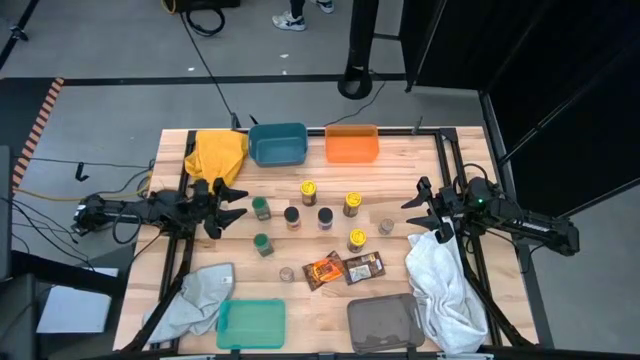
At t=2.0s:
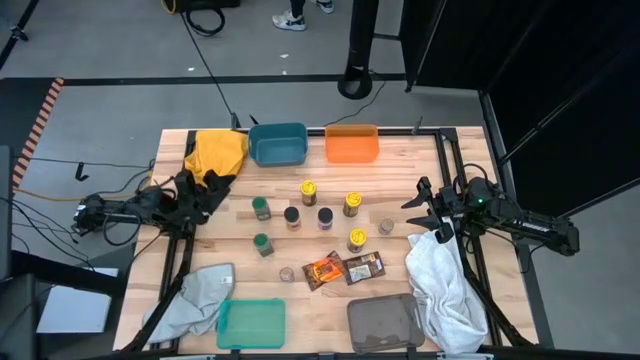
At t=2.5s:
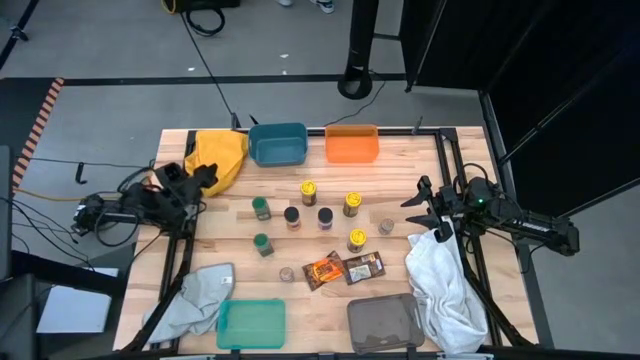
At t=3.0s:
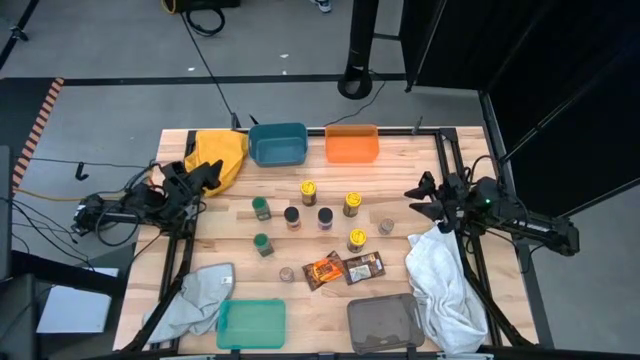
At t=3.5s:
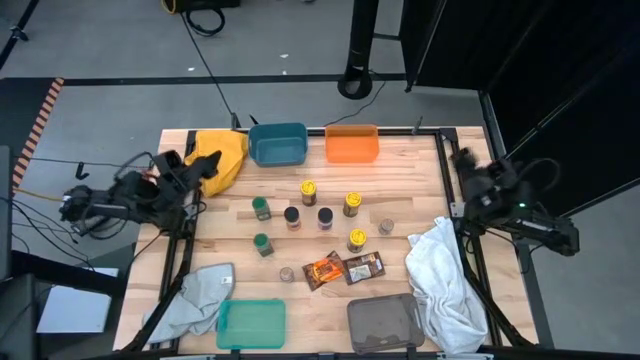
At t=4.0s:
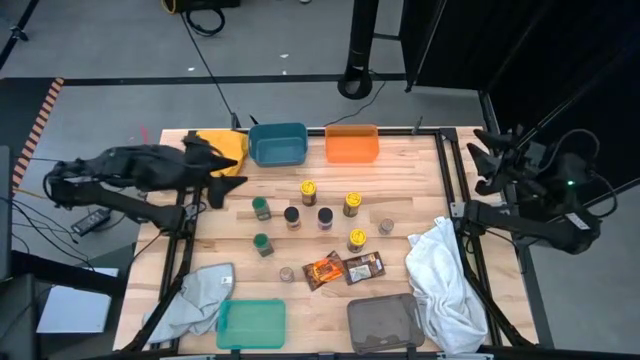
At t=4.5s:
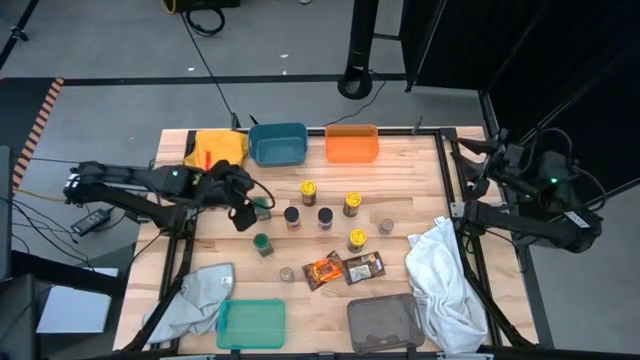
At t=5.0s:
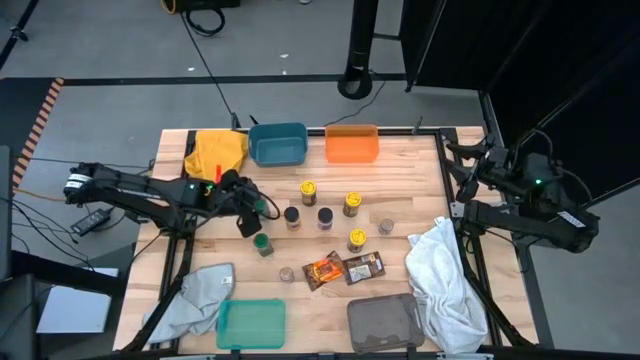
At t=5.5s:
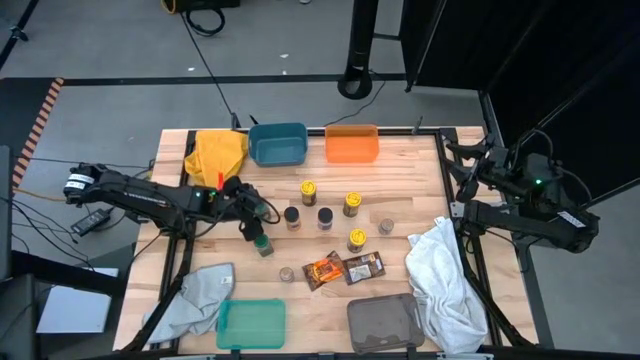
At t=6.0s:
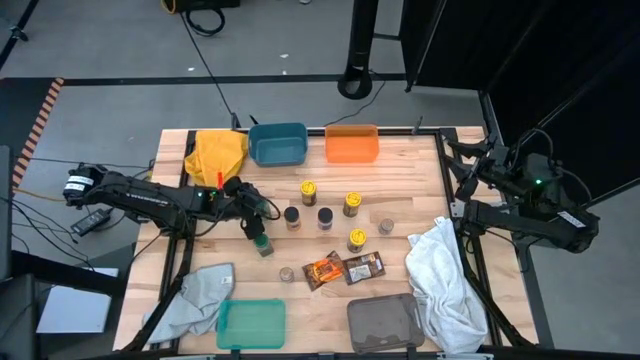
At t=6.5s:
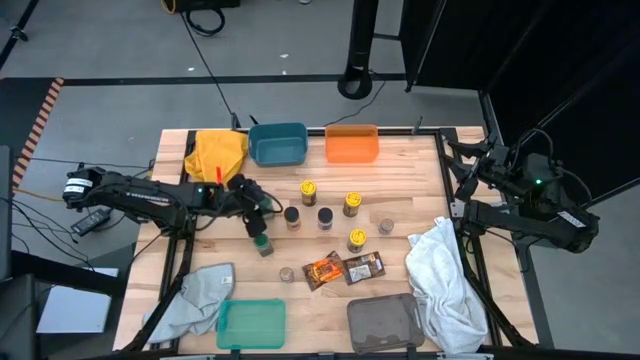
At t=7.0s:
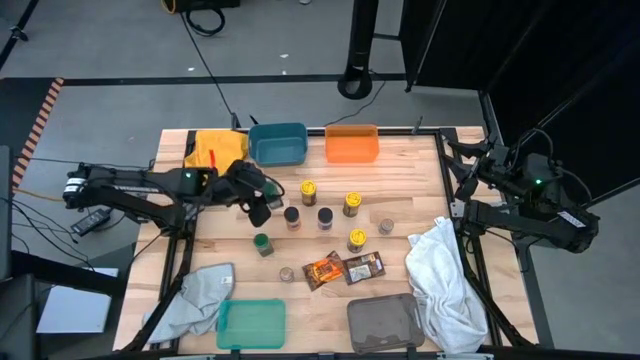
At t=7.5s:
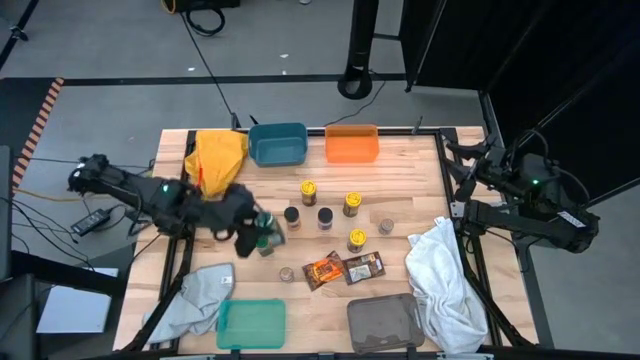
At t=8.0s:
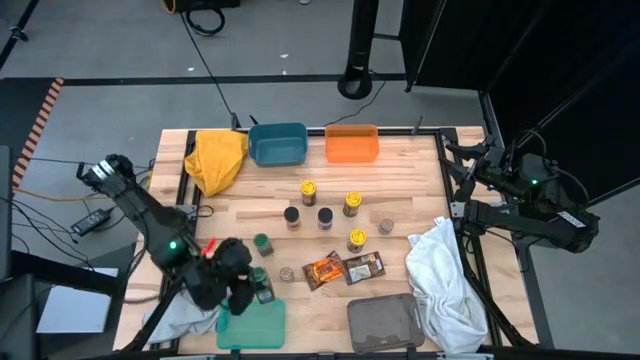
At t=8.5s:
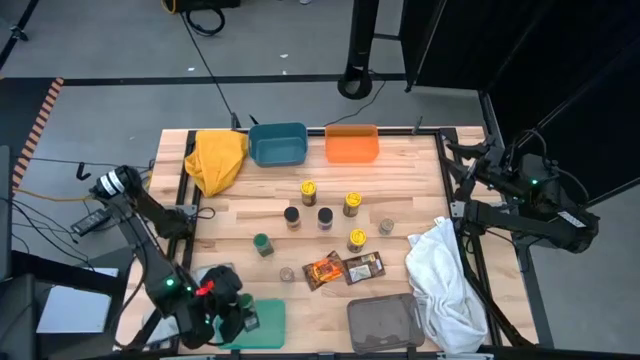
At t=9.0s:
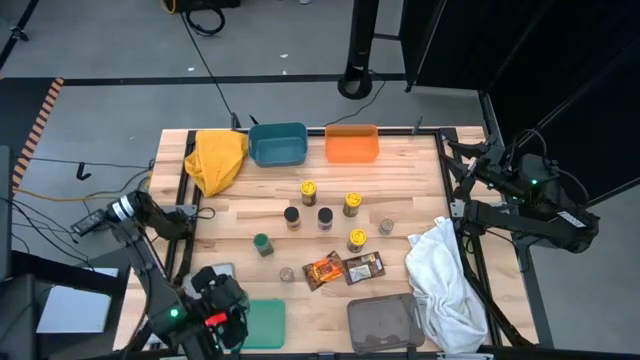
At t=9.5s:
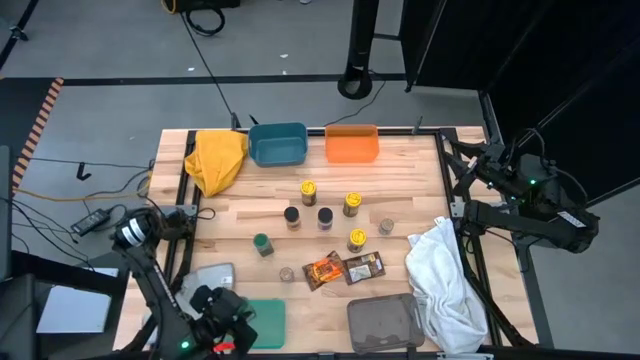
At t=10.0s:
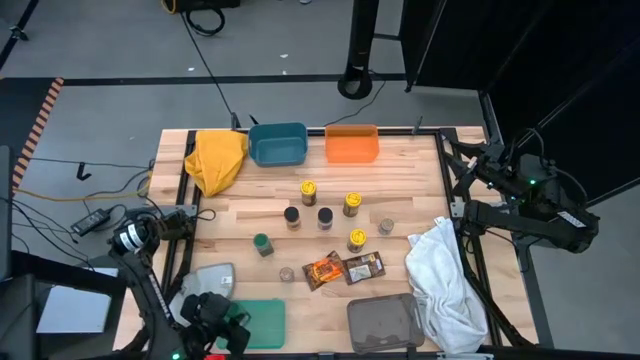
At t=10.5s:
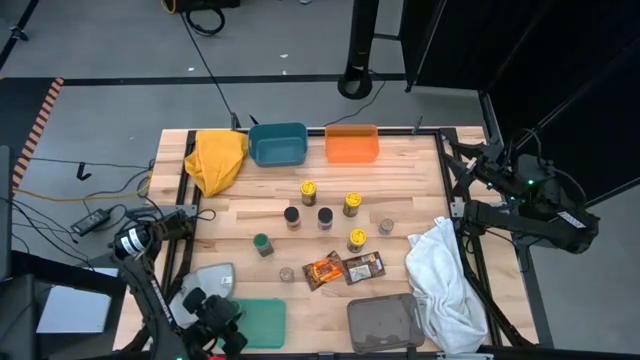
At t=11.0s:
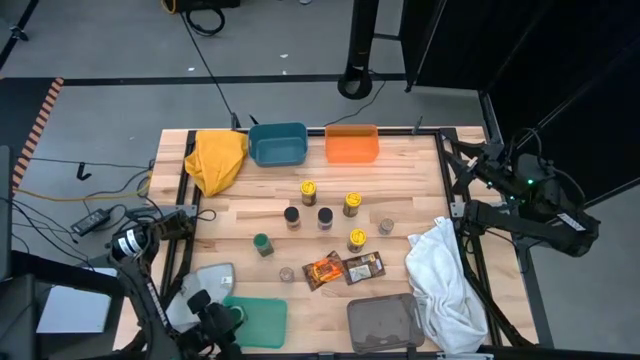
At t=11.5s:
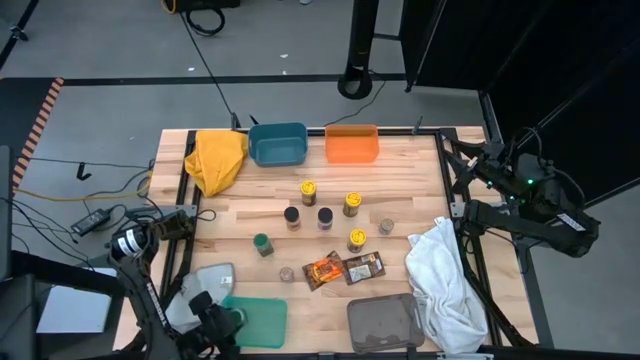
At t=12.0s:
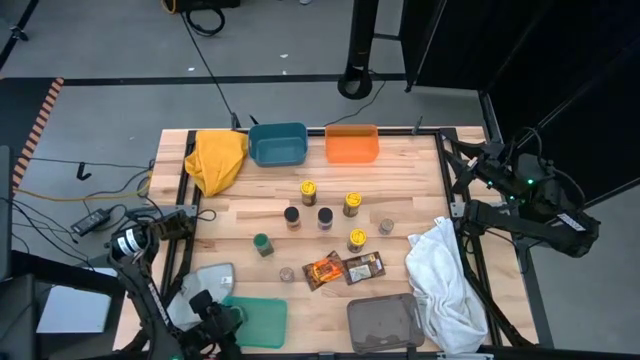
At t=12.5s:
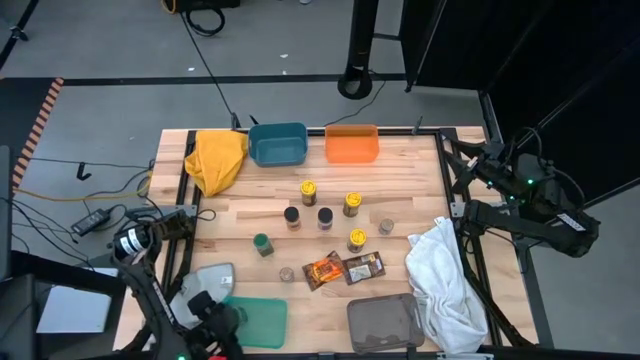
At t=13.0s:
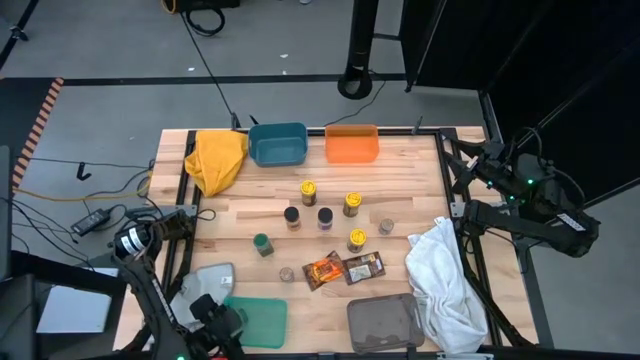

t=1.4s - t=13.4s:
Task: Sort spices by type
Put the top green seasoning bottle into the green bin

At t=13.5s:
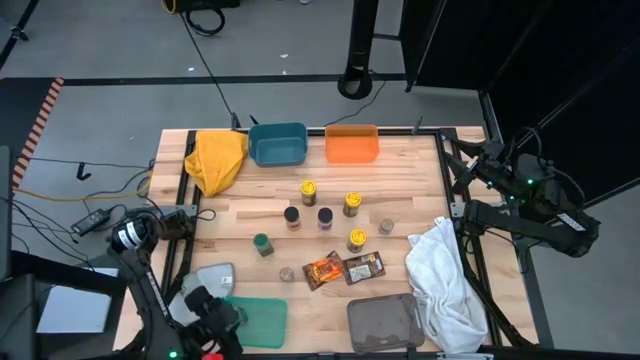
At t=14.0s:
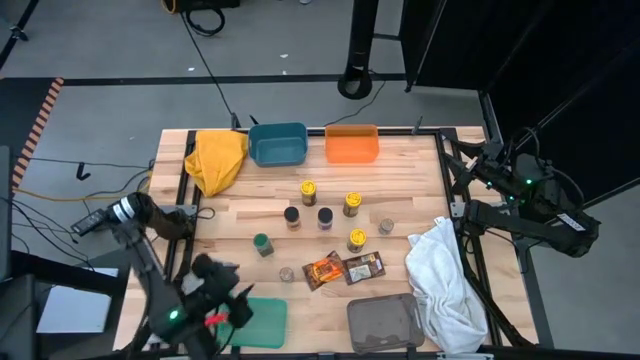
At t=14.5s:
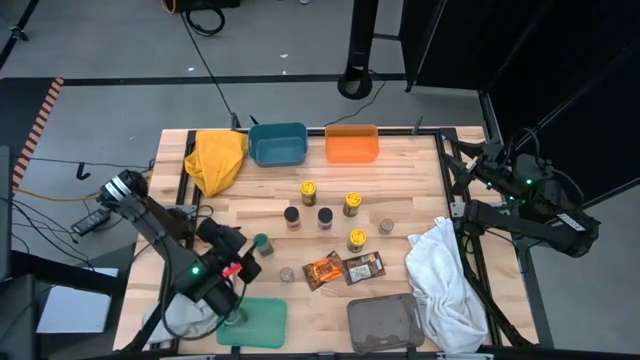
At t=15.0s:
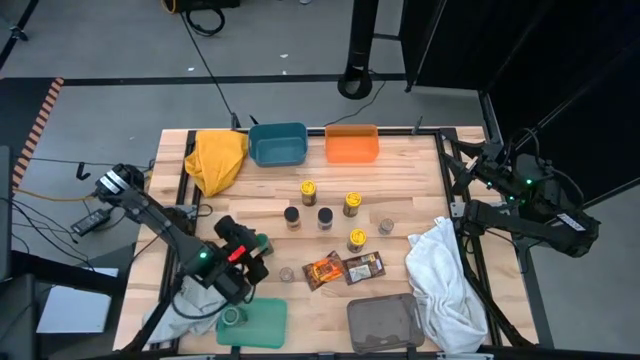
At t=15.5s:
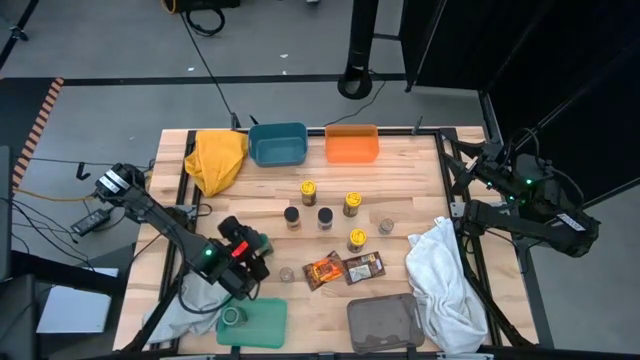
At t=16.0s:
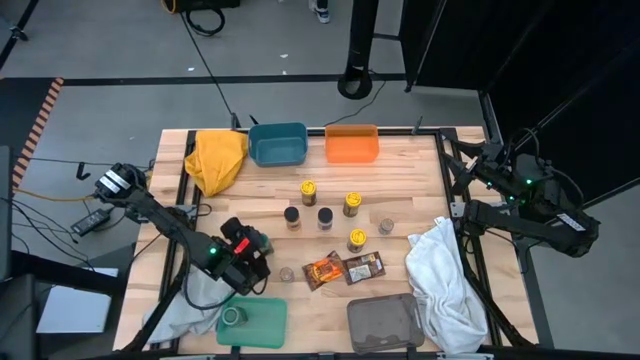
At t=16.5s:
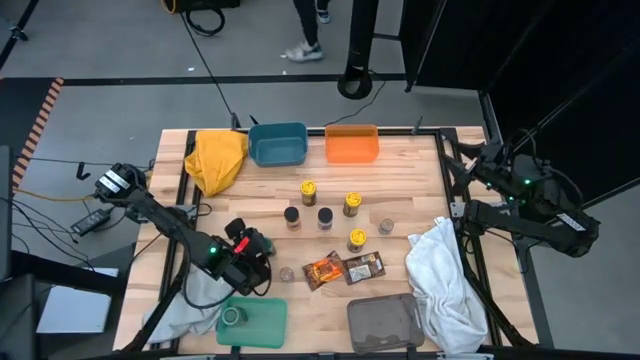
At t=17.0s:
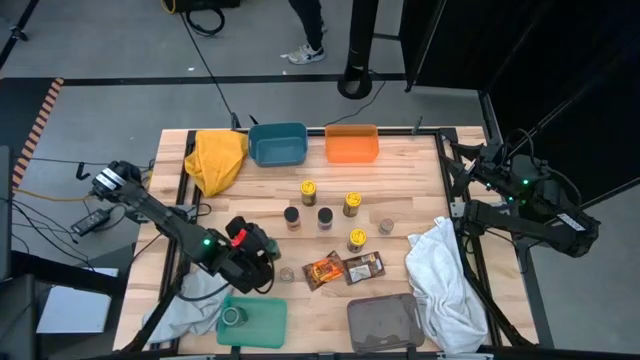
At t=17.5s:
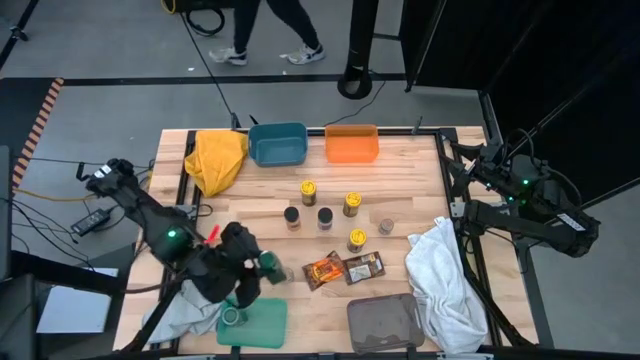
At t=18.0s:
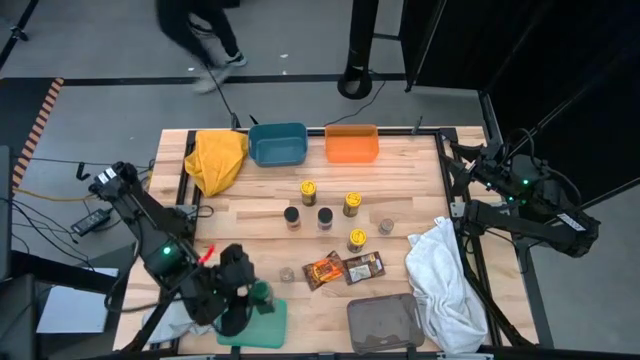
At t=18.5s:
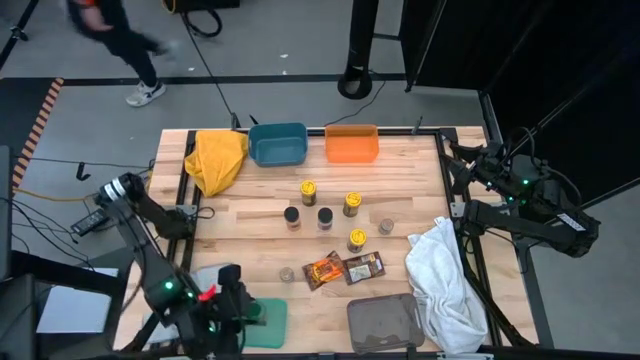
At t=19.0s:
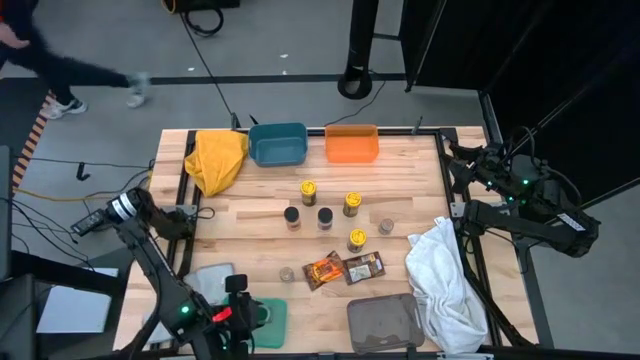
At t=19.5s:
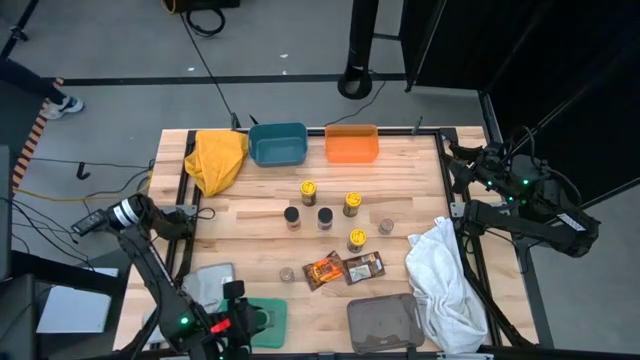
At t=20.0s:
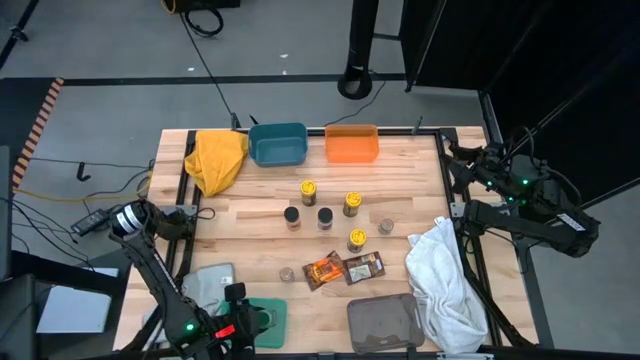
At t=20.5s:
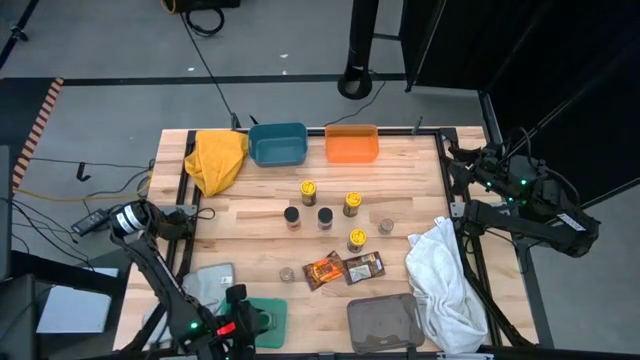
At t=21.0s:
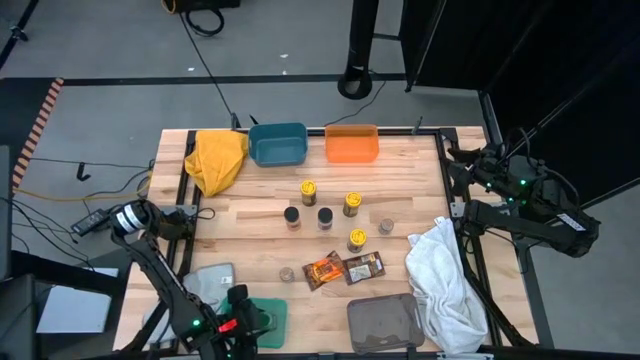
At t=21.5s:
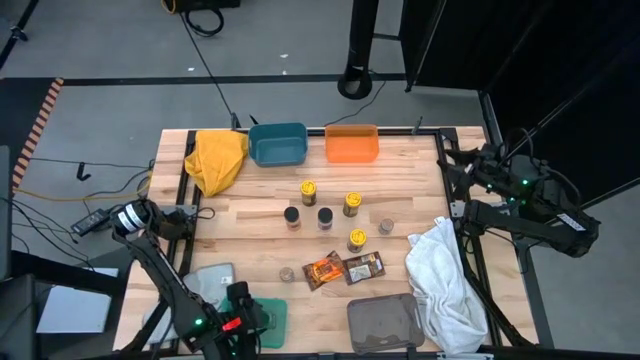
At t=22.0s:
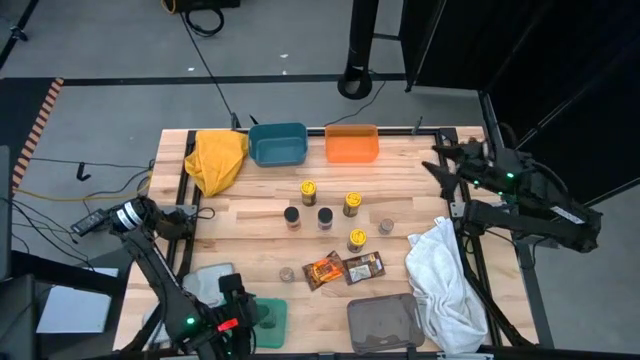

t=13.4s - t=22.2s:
Put the green seasoning bottle into the green bin
